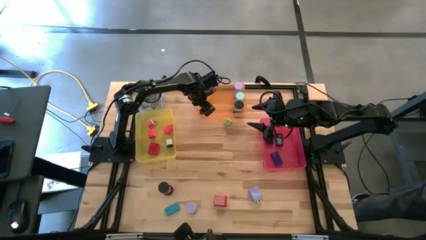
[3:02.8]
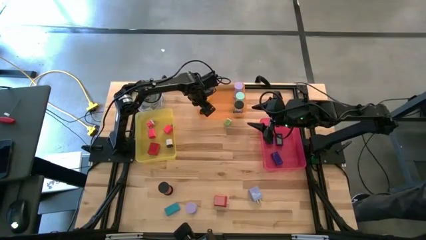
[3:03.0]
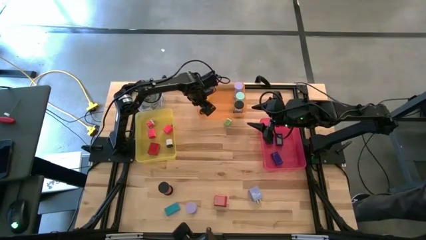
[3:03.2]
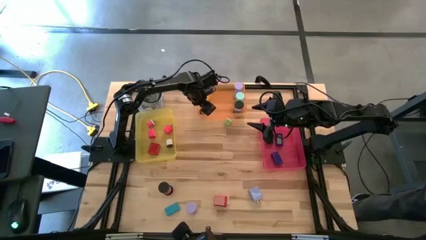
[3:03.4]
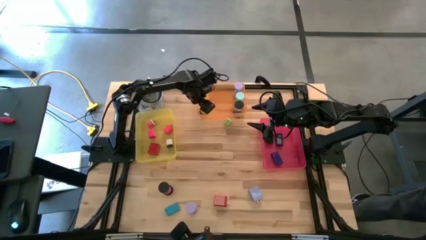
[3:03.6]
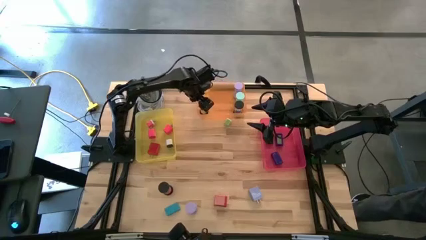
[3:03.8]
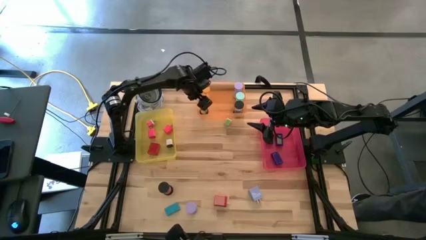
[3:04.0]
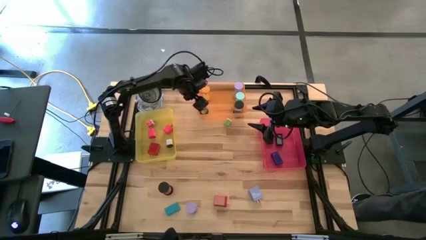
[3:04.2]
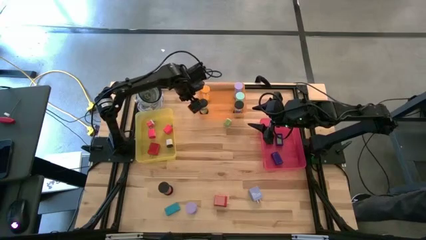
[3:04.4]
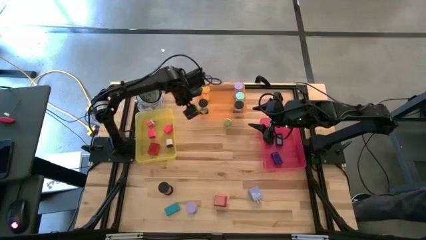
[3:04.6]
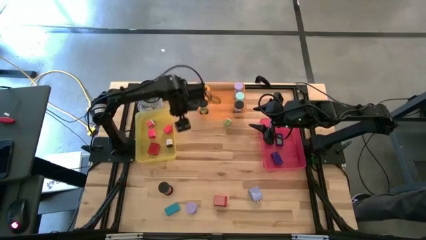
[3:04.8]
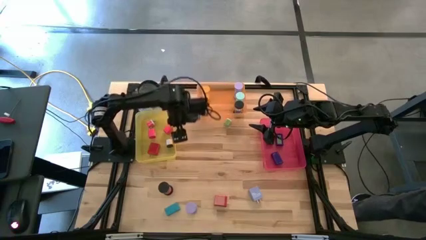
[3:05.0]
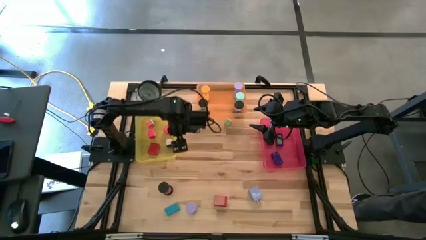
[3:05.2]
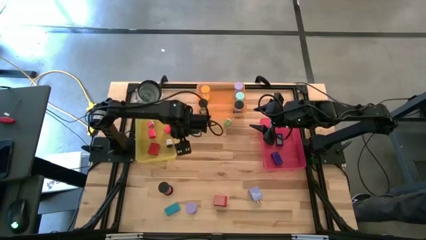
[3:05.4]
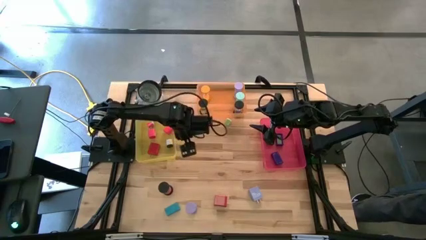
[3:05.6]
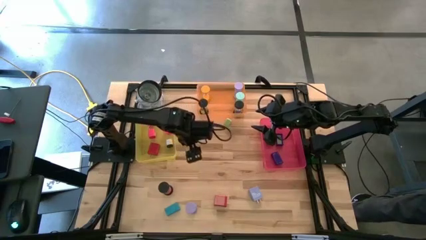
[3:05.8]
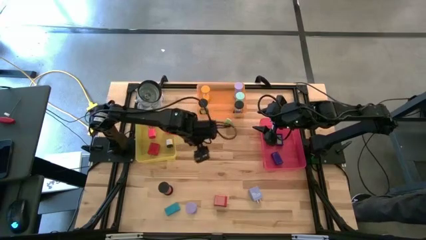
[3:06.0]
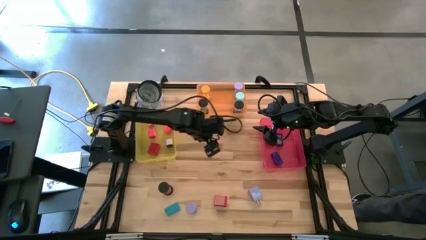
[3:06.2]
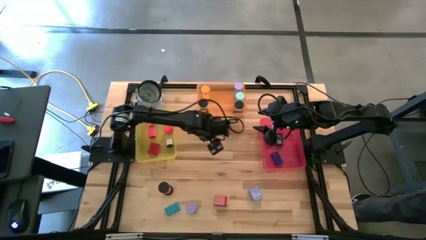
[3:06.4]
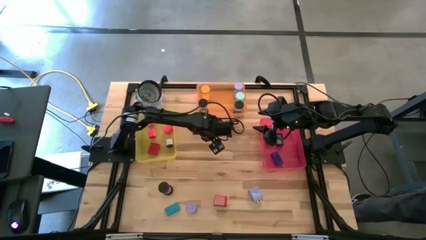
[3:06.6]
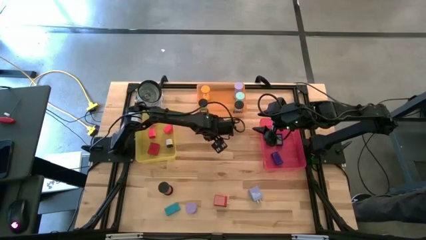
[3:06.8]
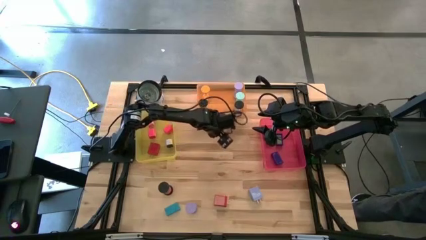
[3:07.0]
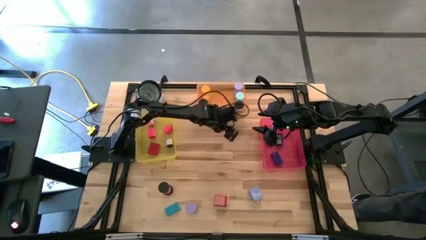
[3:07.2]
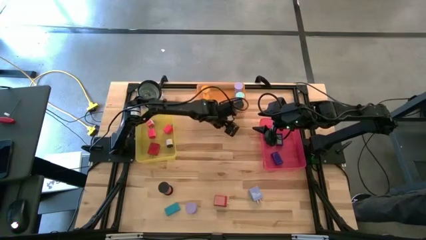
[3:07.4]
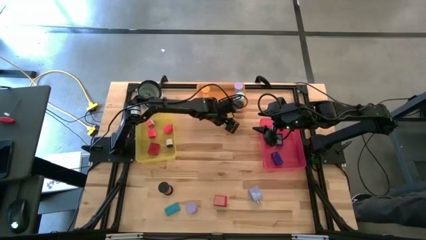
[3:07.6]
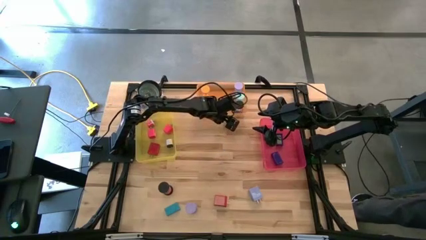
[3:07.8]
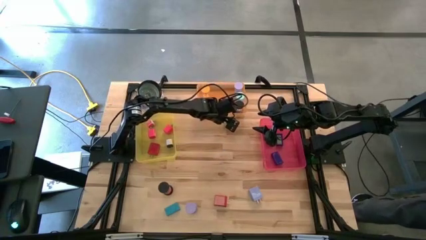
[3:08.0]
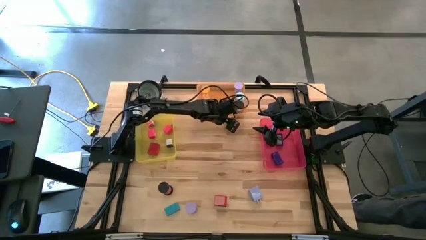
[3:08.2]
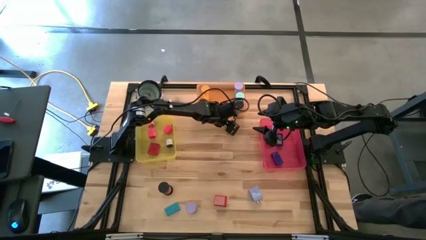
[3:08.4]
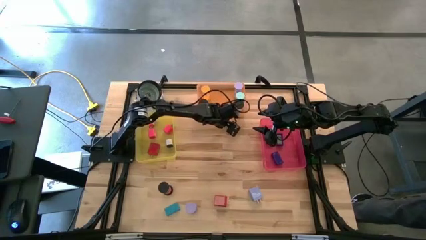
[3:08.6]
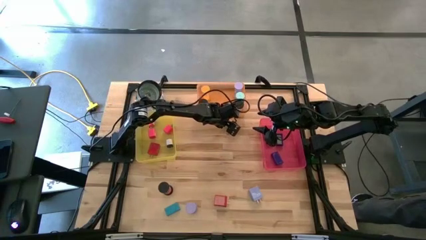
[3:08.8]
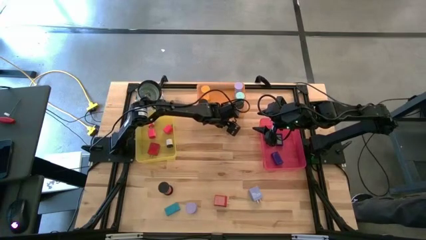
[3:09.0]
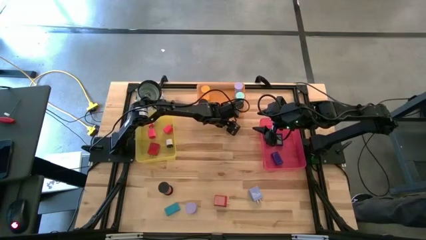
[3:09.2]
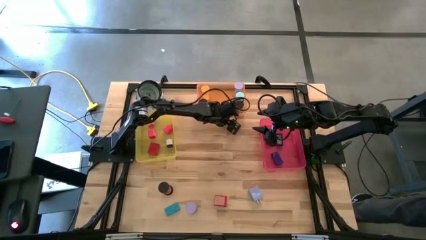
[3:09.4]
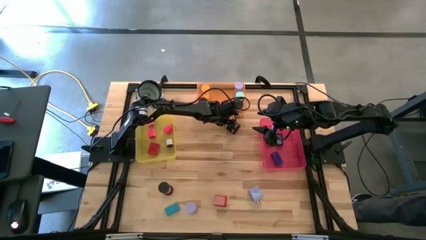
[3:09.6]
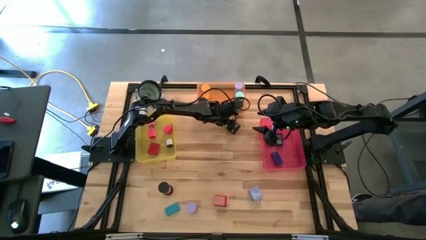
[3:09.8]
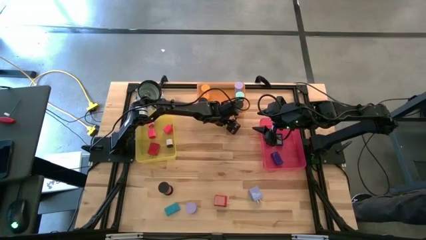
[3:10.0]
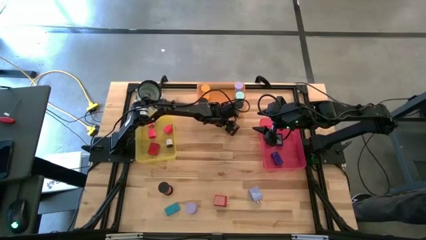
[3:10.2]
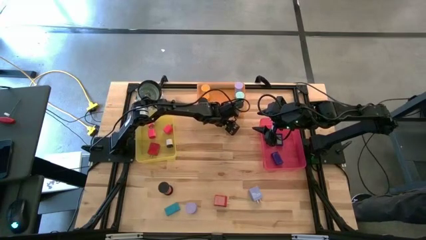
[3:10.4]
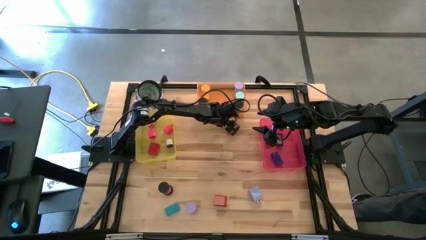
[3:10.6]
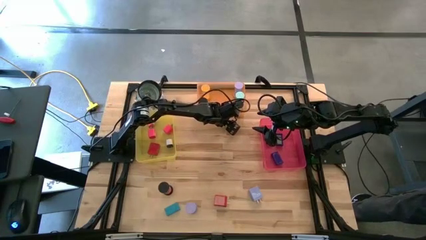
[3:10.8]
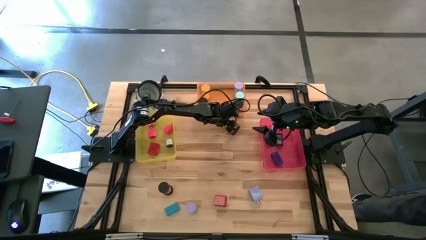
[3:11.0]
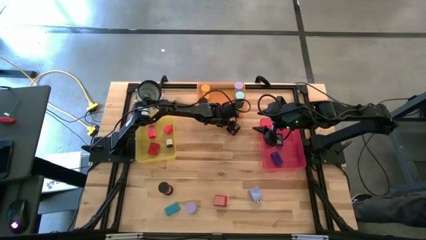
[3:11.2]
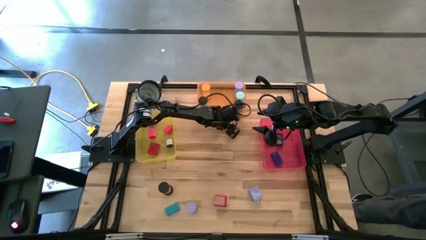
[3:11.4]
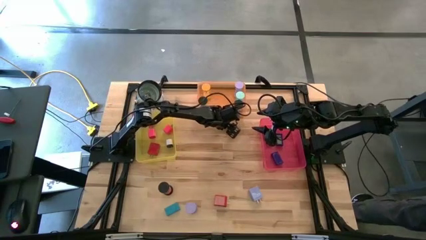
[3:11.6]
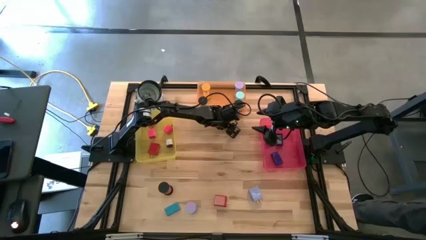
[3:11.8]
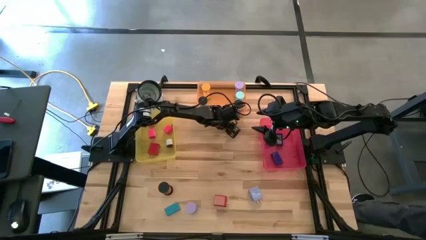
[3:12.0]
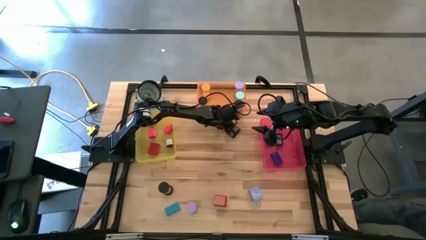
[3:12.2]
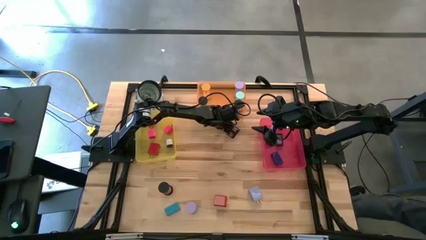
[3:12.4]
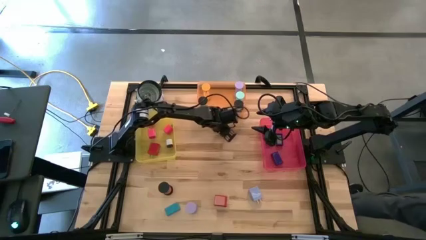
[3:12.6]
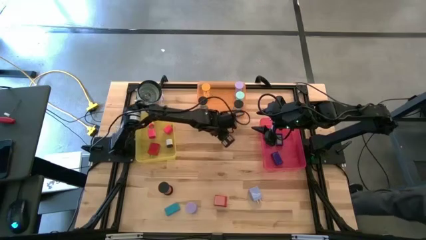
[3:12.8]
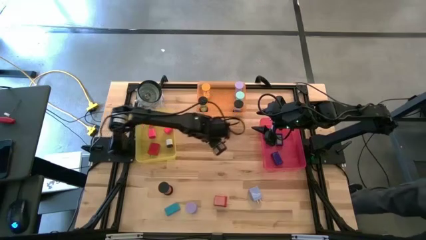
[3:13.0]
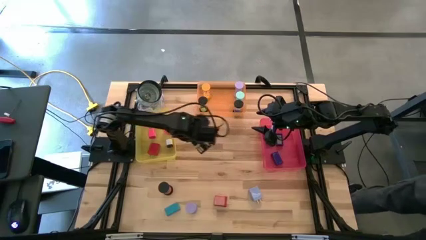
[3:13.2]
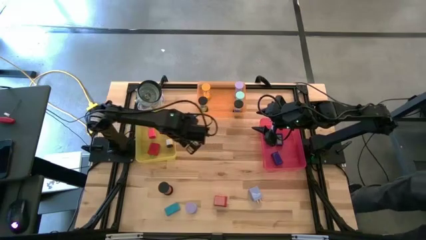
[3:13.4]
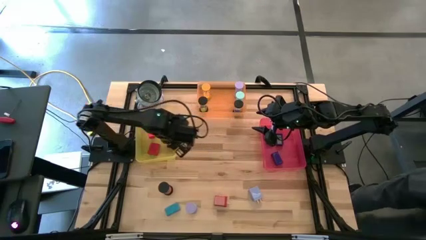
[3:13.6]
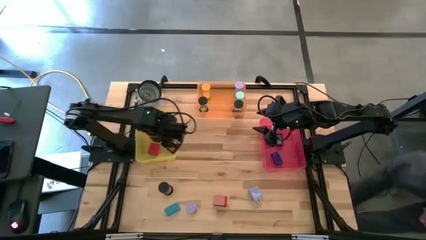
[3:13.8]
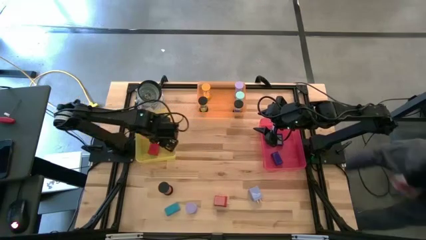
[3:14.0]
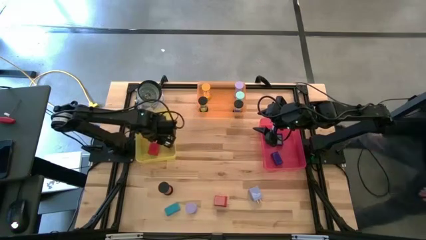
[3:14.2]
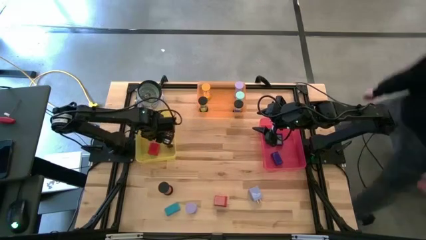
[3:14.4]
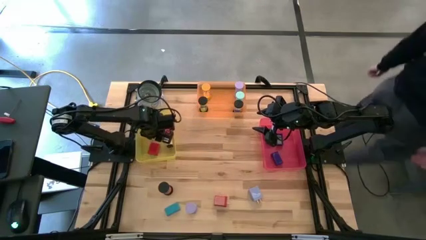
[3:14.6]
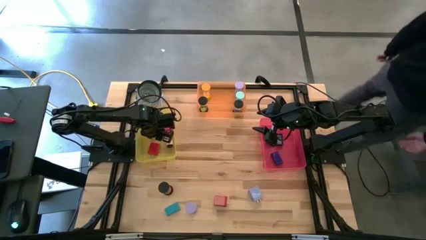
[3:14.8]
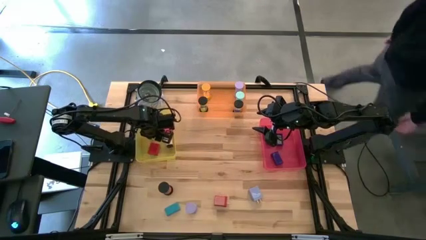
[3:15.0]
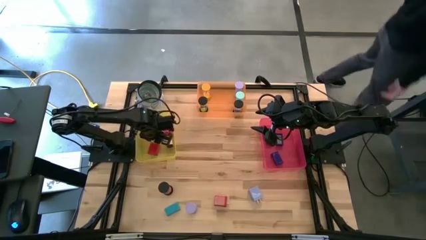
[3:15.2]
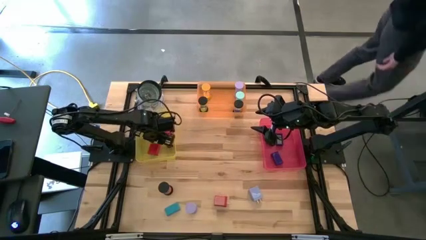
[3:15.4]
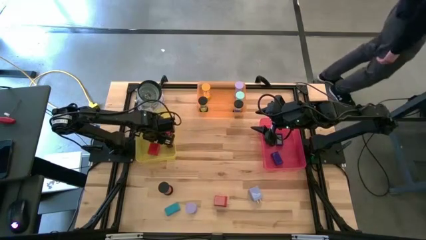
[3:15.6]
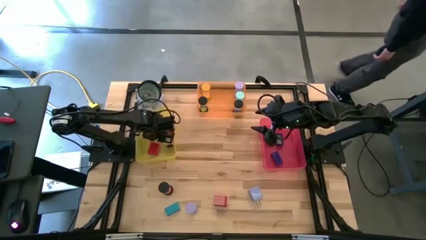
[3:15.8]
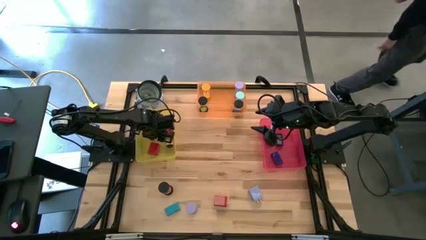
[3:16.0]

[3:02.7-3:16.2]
Task: Pick & Place Office items
Put the red charger in the yellow bin

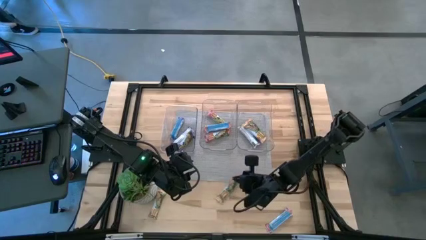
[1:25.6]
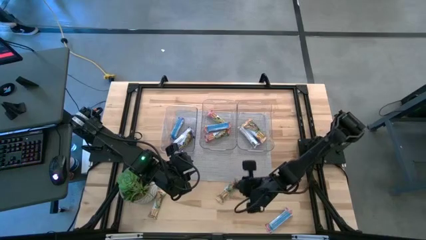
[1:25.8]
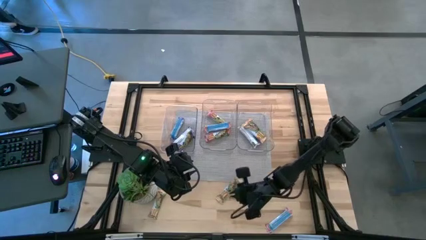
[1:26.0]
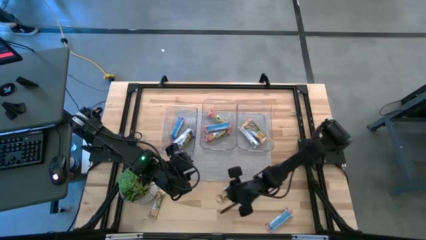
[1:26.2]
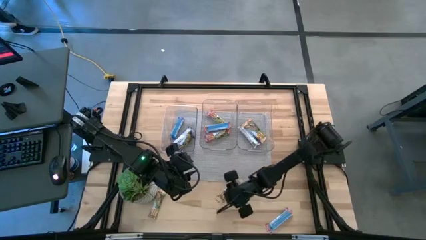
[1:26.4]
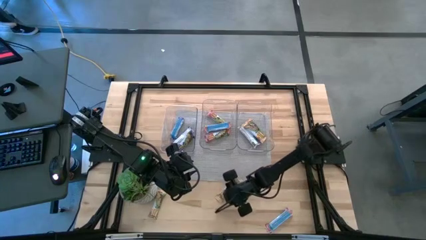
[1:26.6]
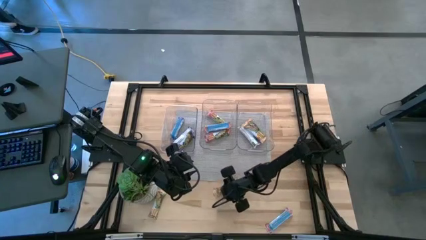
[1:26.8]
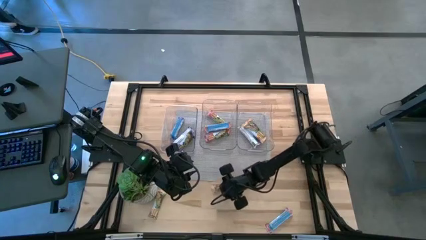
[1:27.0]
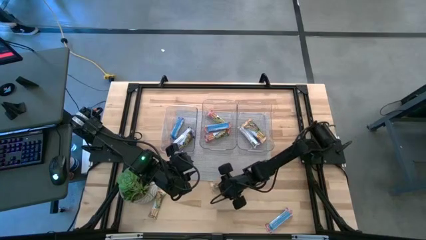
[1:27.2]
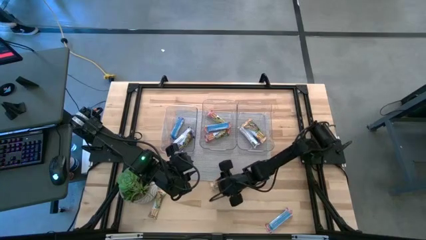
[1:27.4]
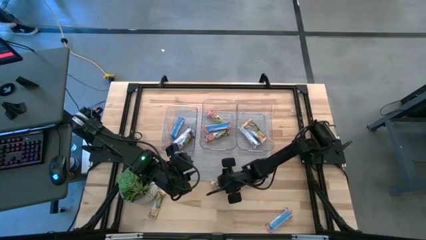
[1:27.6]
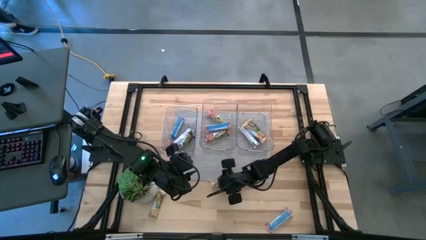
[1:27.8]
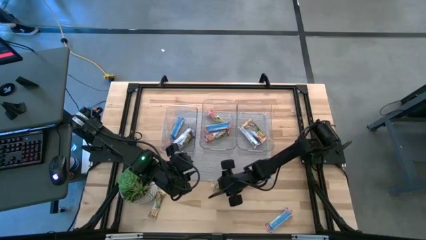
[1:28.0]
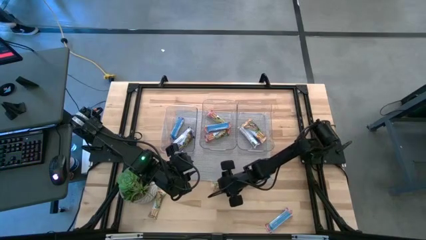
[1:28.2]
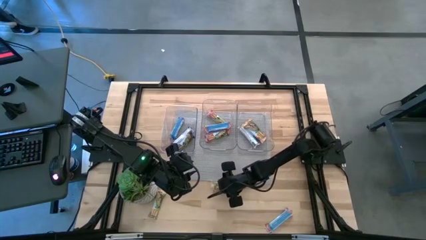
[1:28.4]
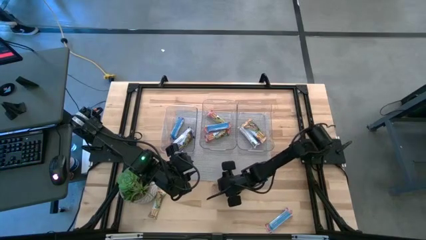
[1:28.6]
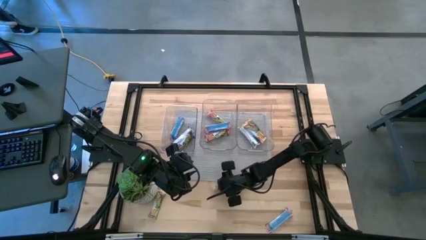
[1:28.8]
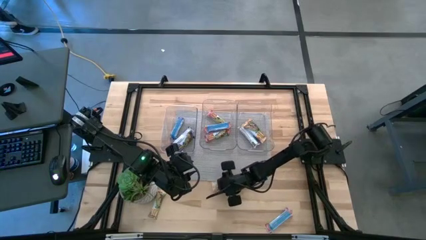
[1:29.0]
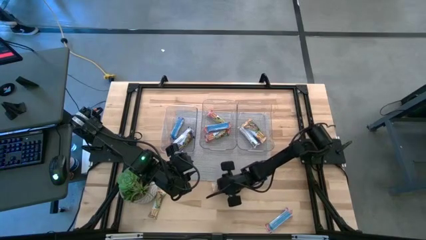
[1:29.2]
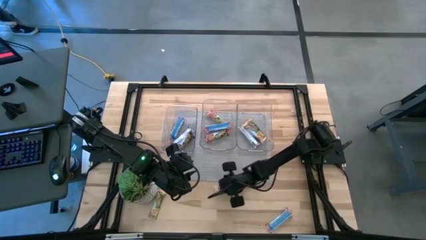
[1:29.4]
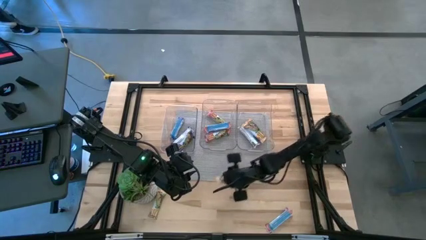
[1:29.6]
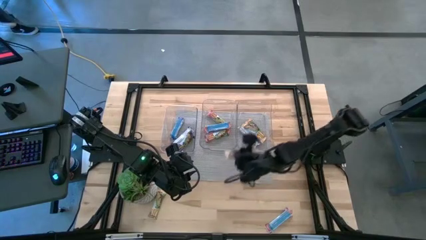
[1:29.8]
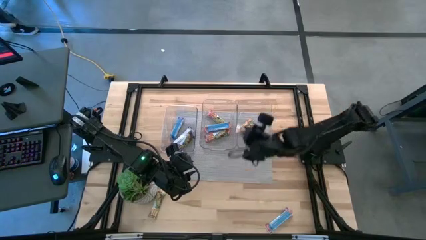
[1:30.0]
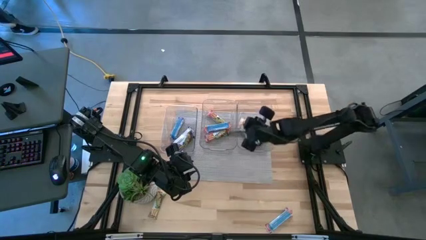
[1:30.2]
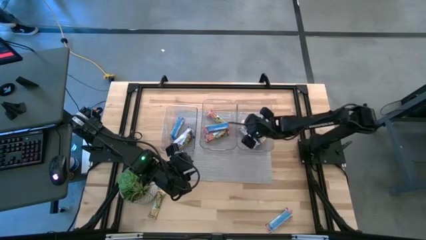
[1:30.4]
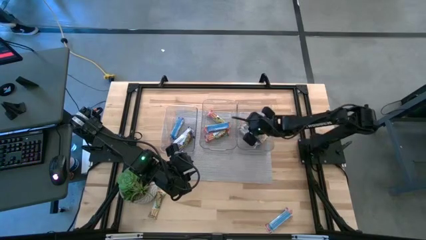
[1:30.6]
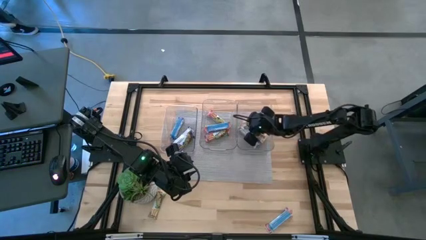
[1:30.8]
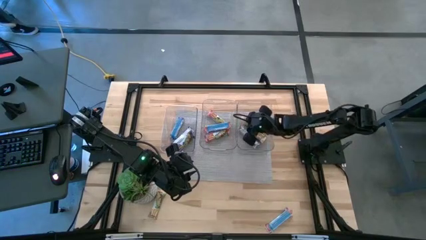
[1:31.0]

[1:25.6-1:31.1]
Task: Pick and place Granola Bars by type
Put the orange granola bar into the middle transparent bin
